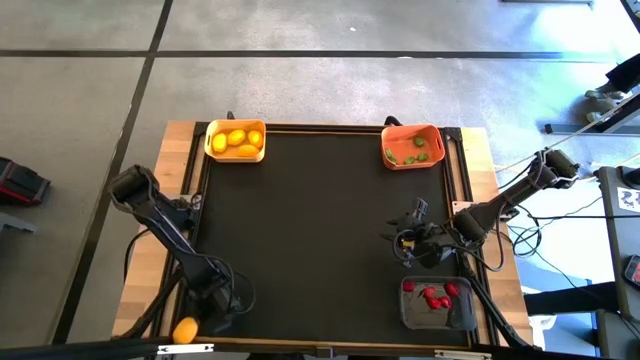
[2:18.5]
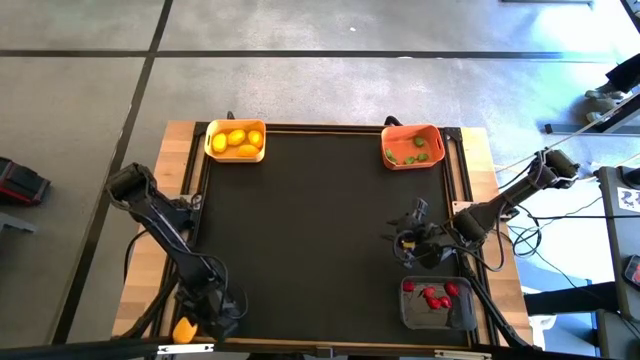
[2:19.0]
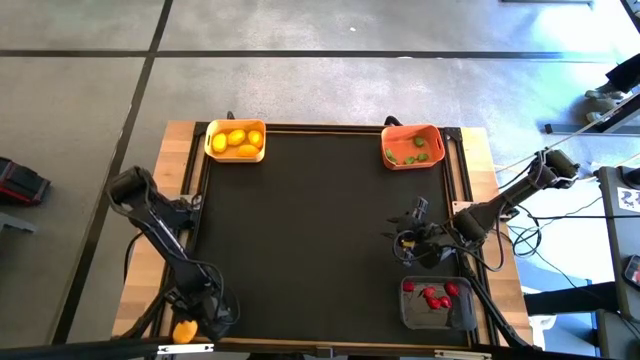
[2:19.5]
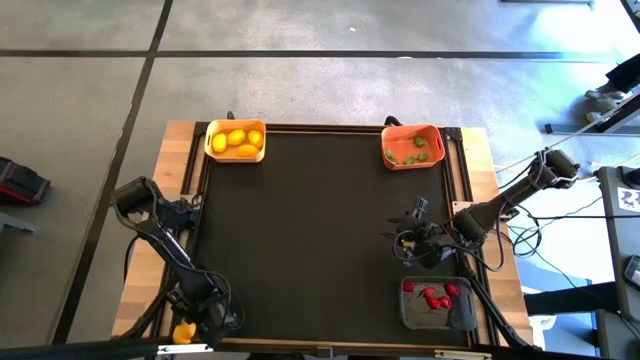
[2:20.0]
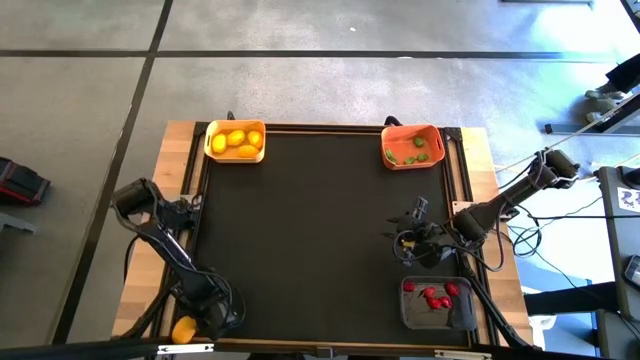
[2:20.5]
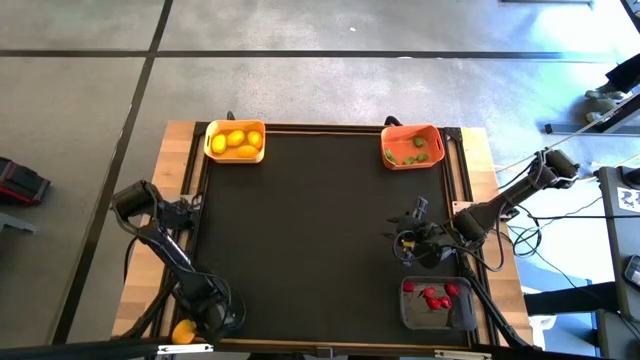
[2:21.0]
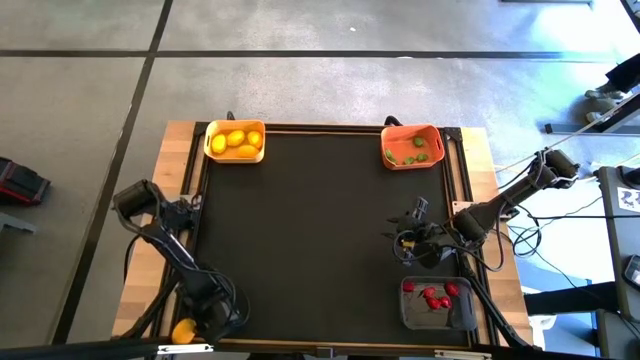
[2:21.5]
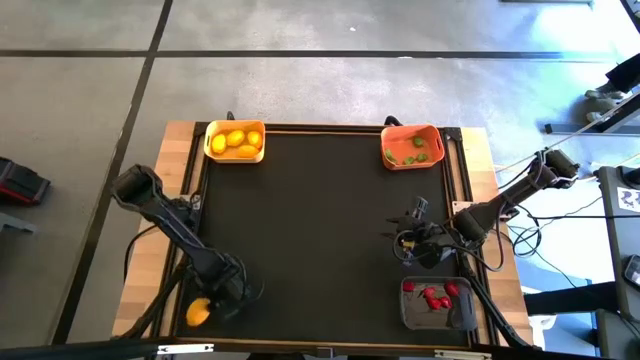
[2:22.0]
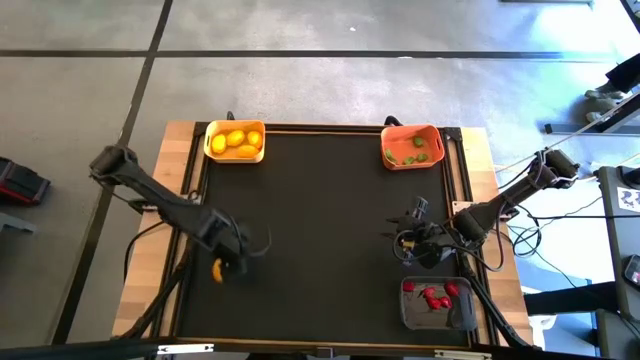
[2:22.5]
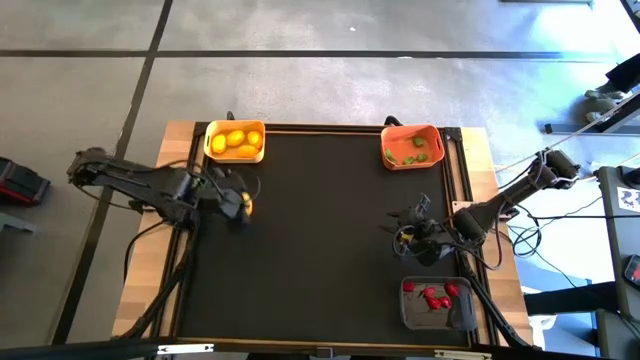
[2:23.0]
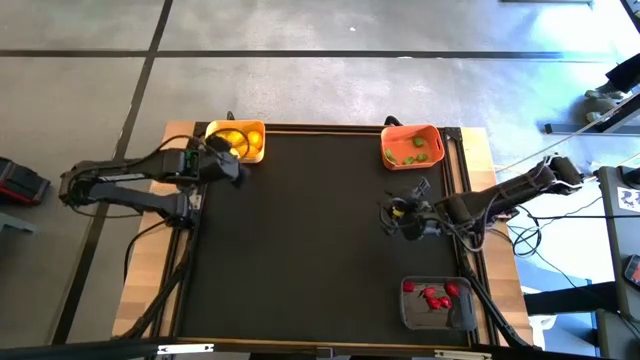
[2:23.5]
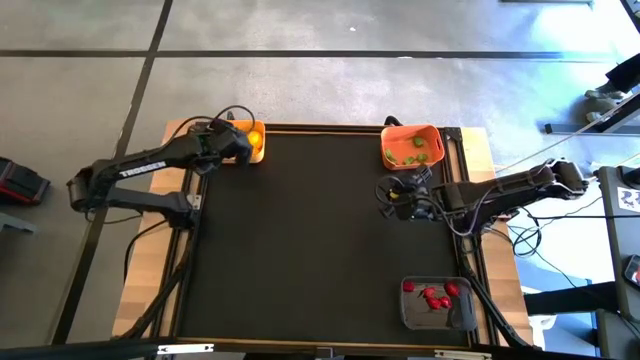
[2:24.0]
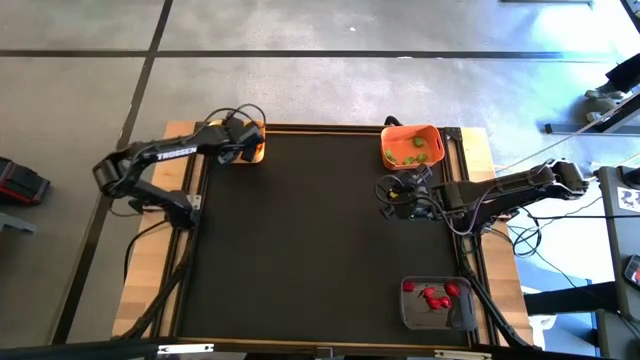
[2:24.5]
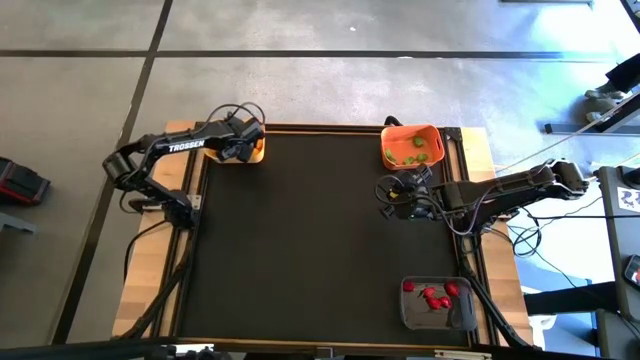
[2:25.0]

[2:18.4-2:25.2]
Task: Sort produce into baskets
Put the lemon into the yellow bin

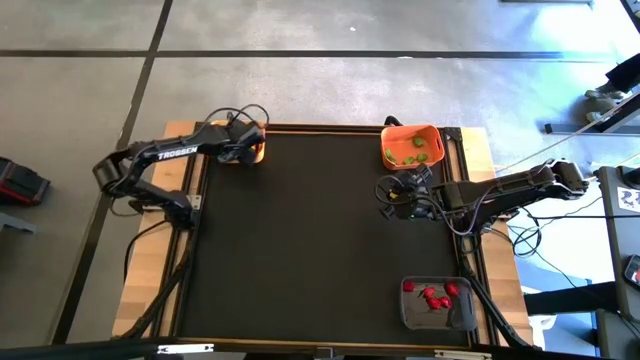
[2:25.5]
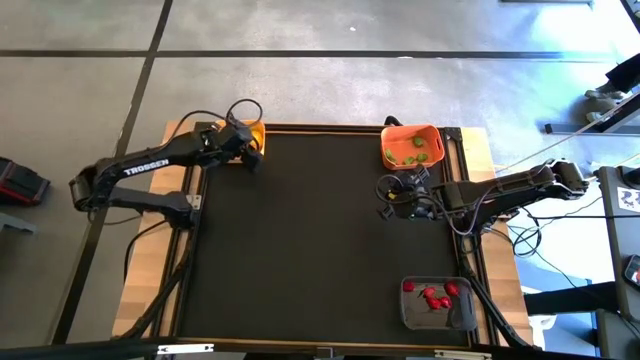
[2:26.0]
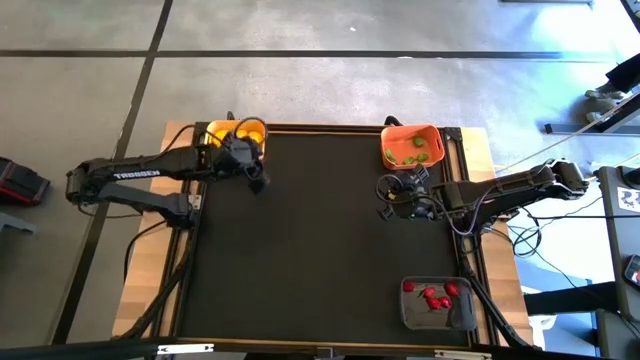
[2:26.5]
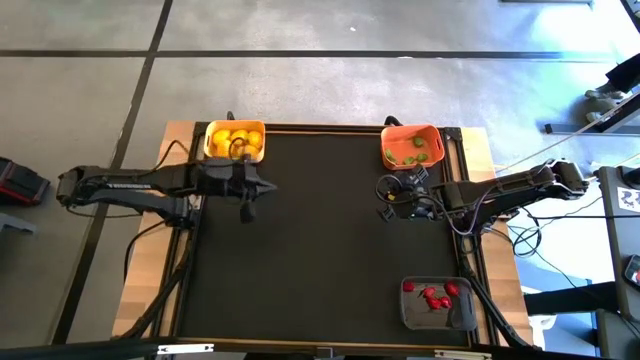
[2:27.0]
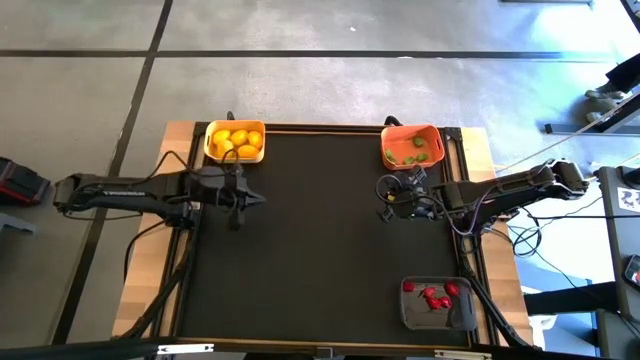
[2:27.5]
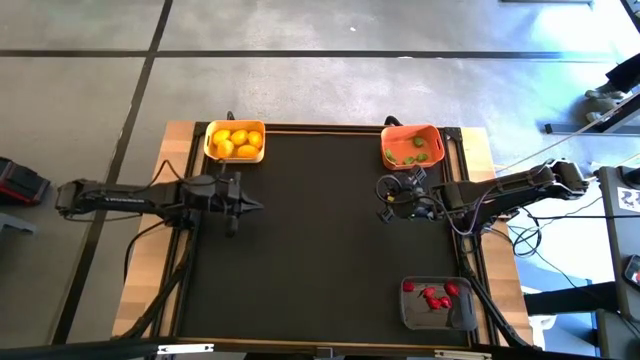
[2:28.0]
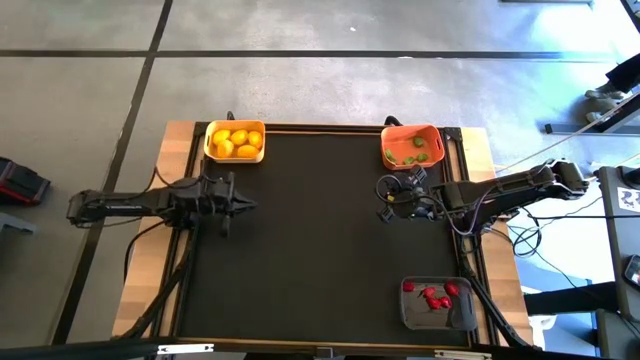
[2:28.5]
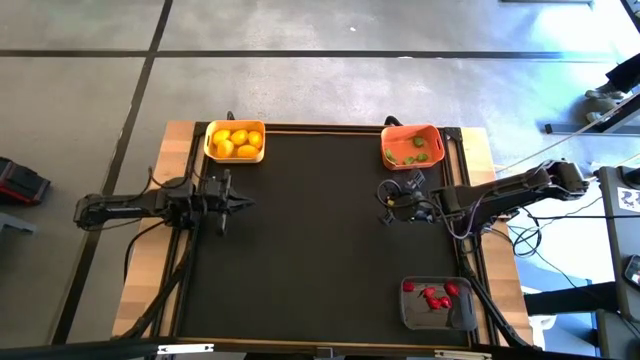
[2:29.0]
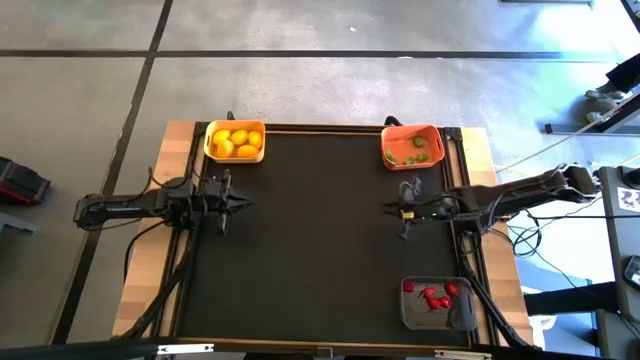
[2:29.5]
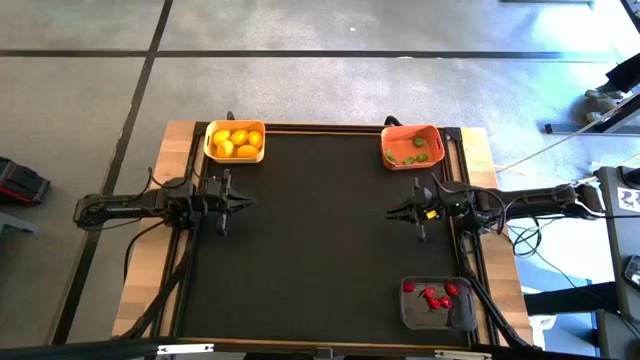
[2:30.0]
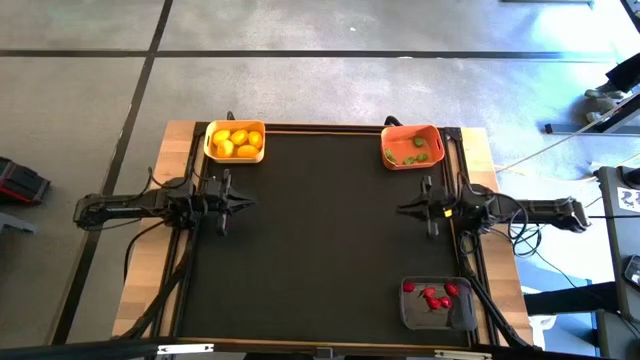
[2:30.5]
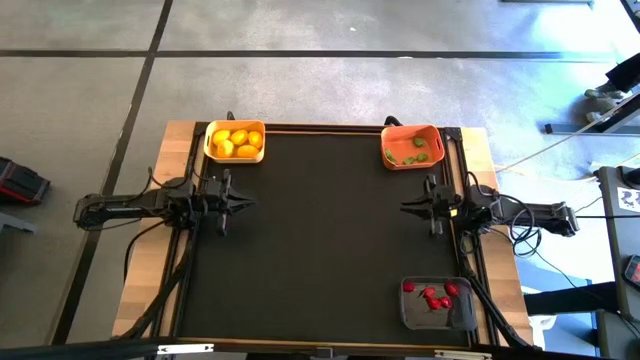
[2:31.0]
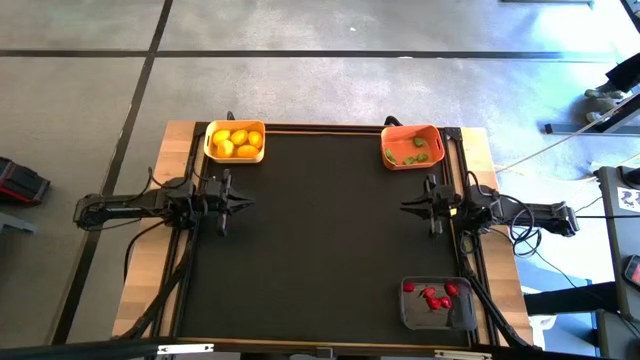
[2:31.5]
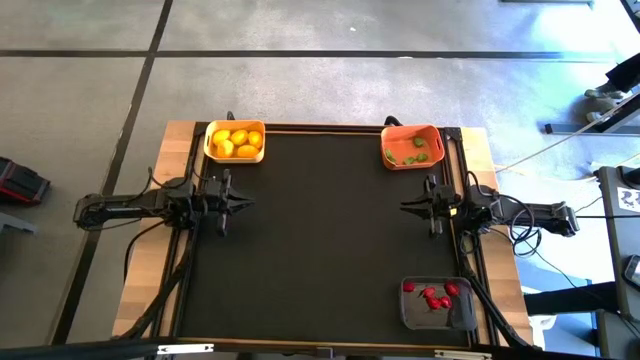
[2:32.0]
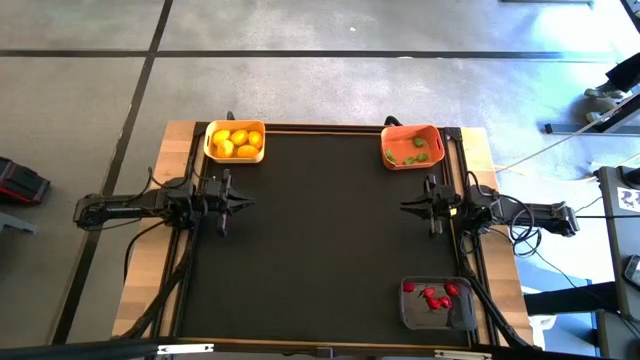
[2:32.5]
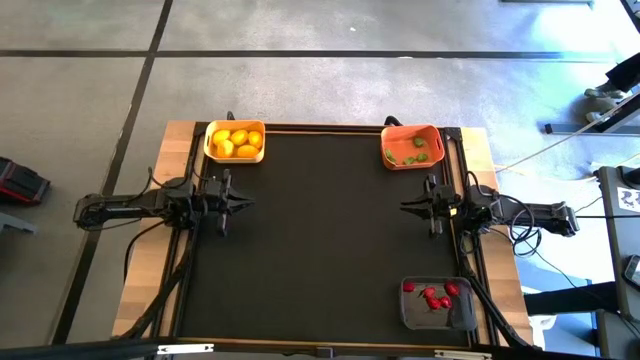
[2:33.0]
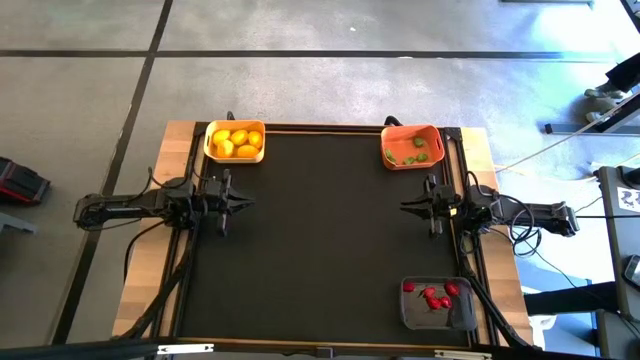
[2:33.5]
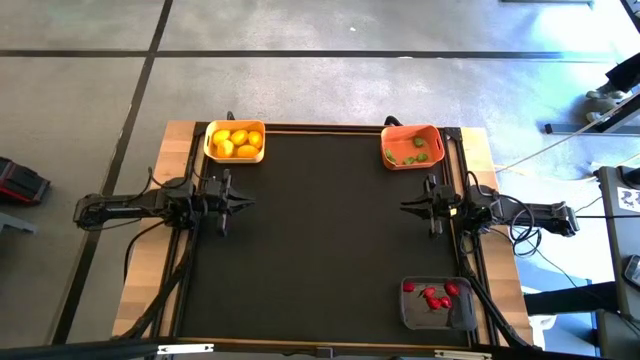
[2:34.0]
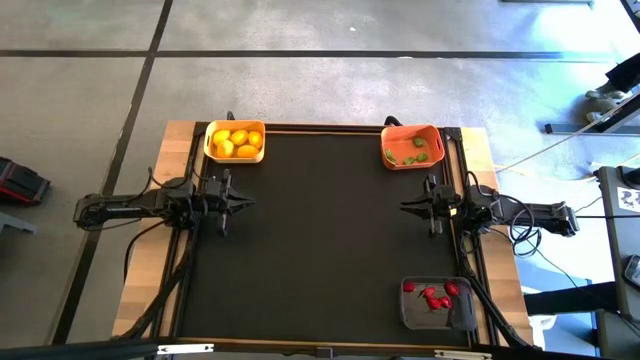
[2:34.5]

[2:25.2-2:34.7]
Return to Home Position

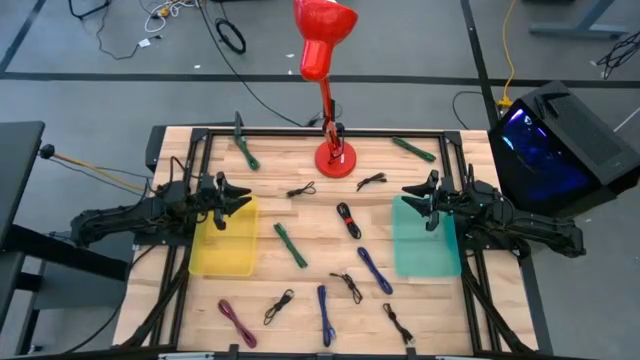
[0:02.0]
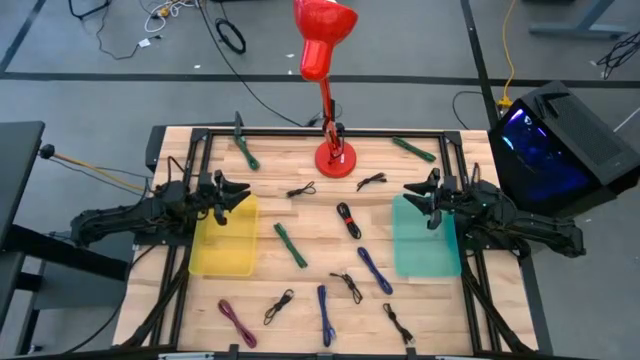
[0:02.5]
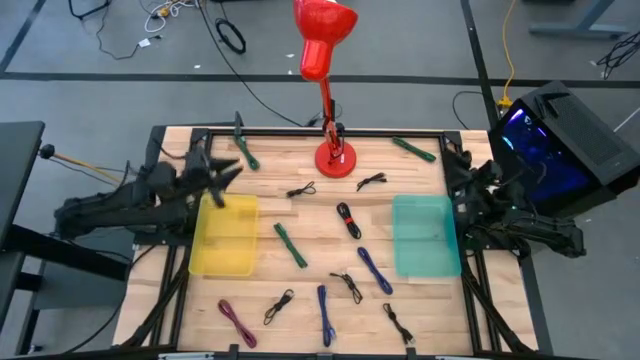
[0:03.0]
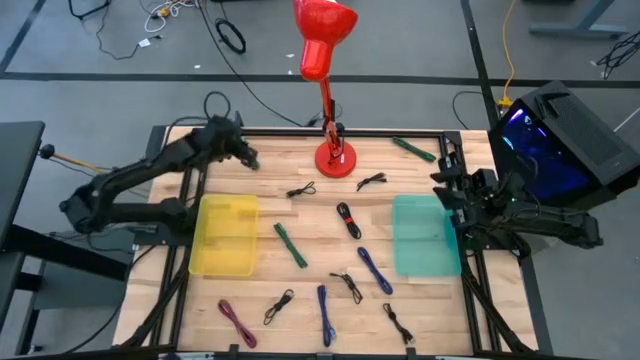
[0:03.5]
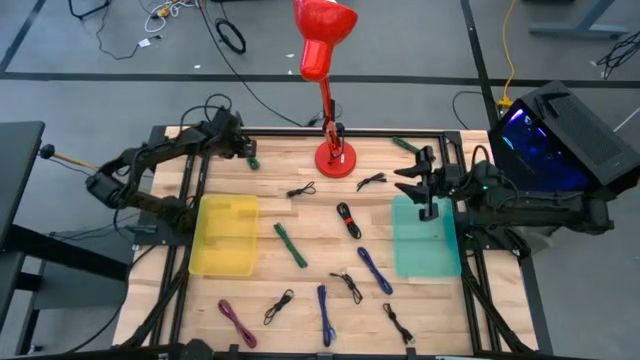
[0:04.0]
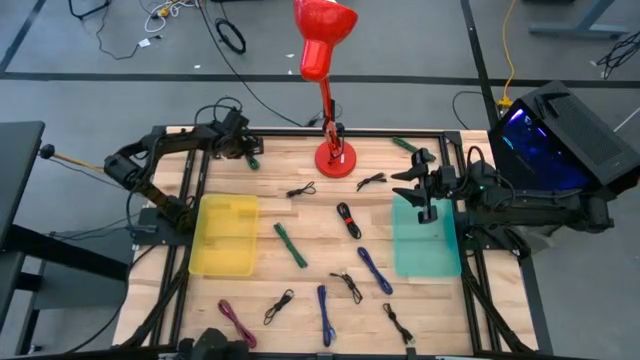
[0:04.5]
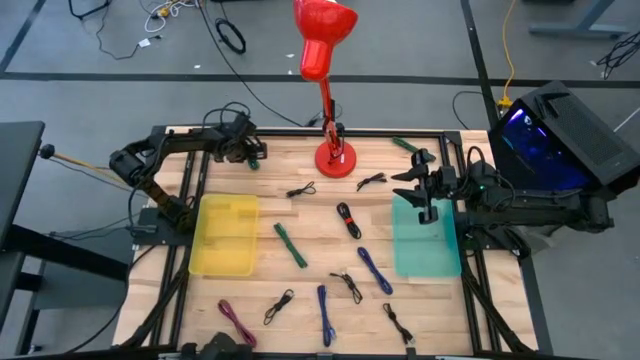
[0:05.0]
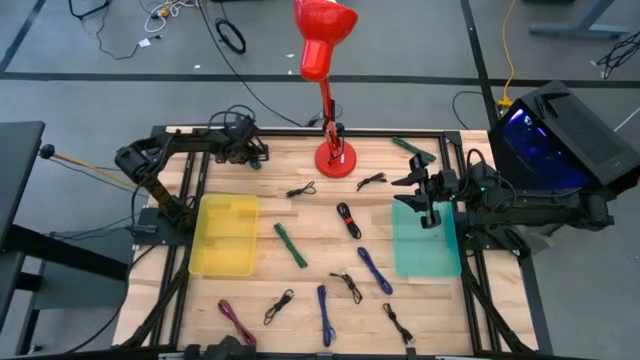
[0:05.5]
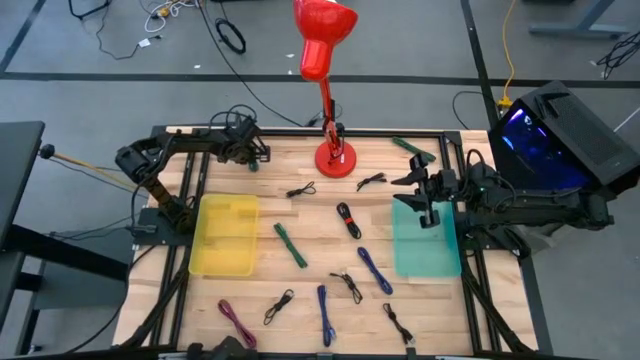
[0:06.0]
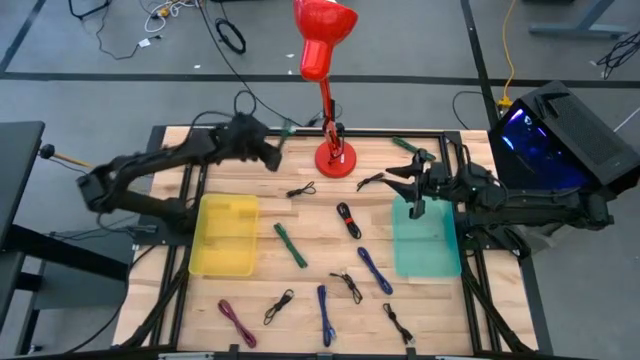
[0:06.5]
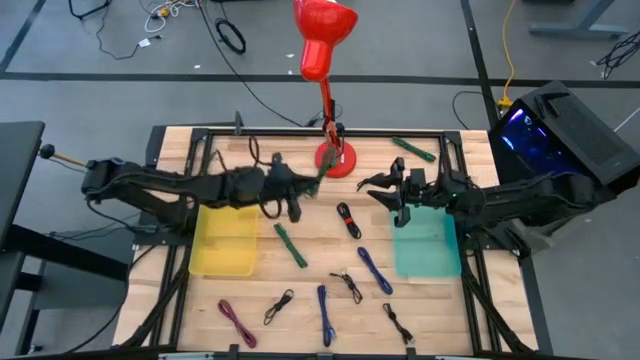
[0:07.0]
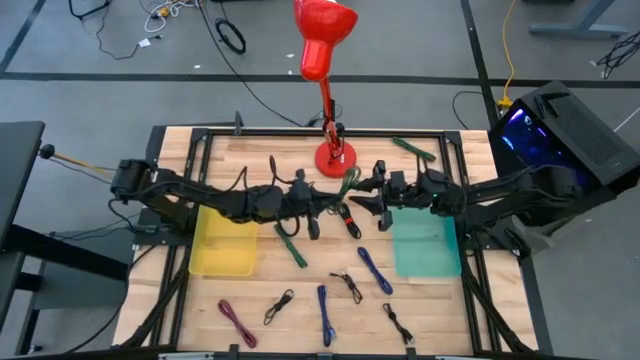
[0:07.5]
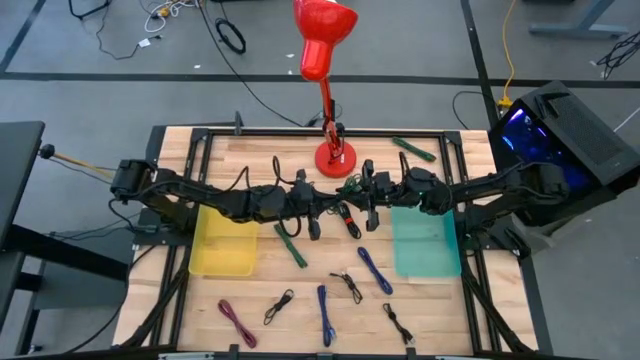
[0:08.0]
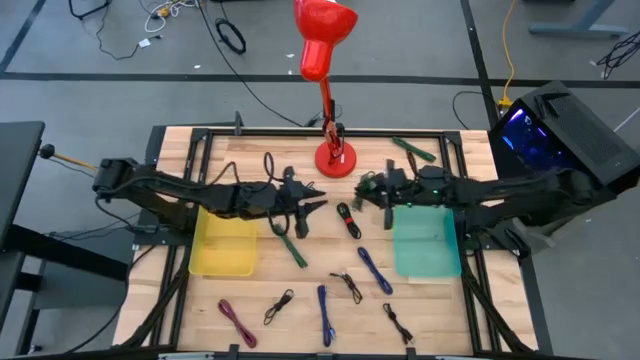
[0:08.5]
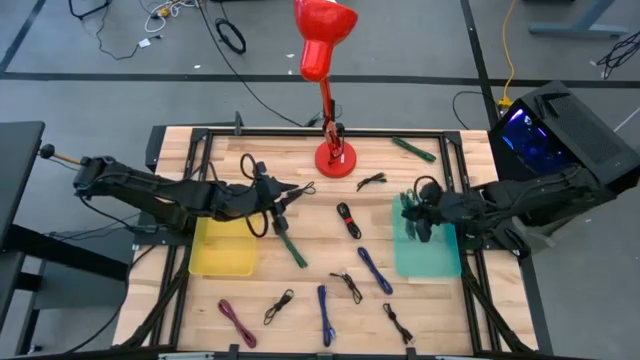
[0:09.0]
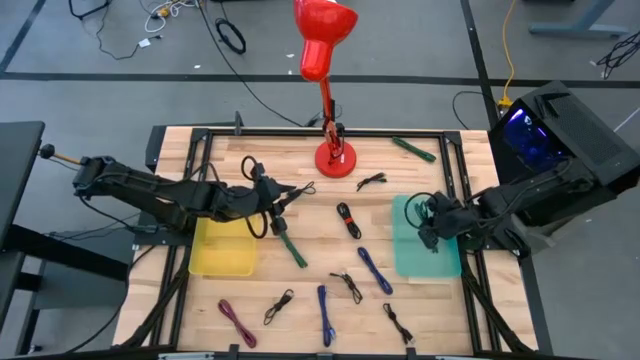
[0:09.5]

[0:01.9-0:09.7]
Task: Pick & Place USB Port
Put the top left green USB cable into the blue transparent bin
